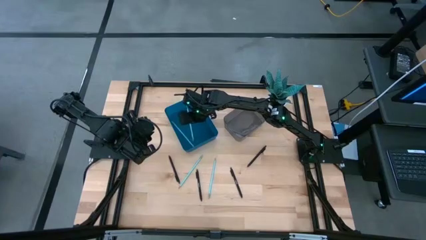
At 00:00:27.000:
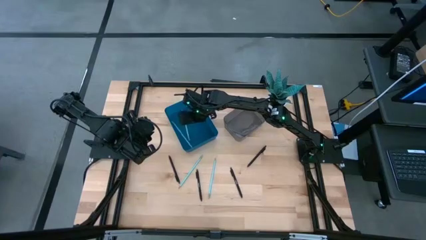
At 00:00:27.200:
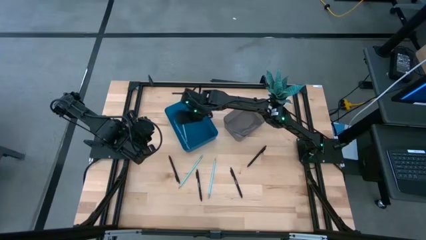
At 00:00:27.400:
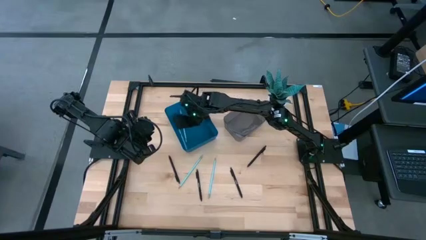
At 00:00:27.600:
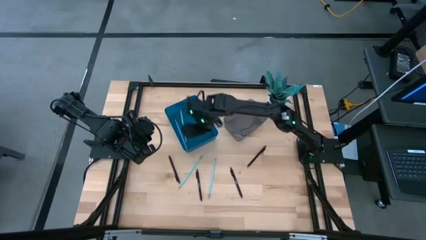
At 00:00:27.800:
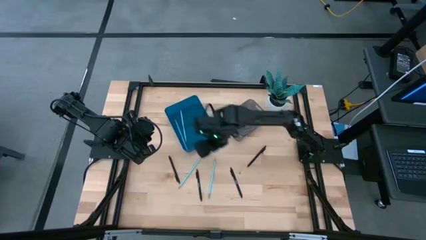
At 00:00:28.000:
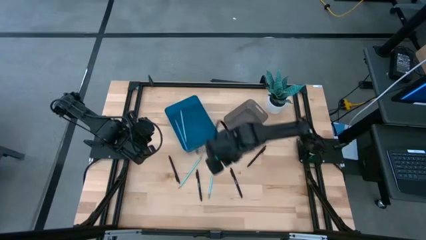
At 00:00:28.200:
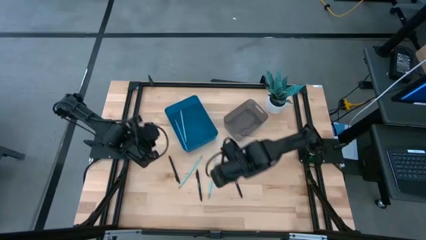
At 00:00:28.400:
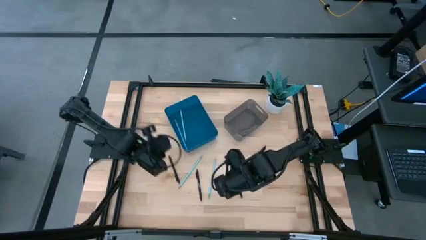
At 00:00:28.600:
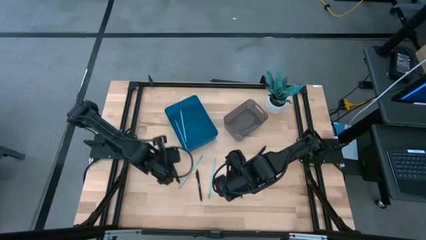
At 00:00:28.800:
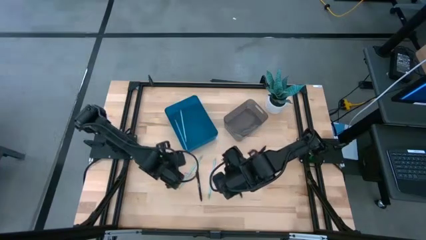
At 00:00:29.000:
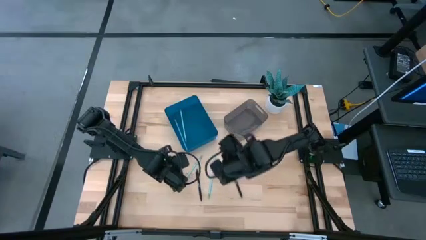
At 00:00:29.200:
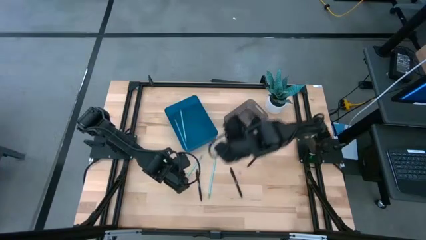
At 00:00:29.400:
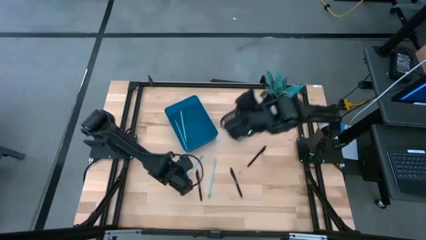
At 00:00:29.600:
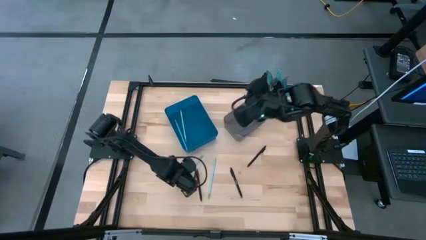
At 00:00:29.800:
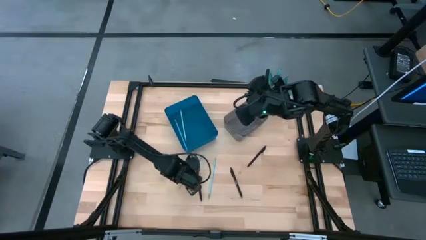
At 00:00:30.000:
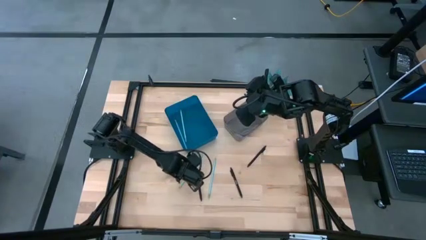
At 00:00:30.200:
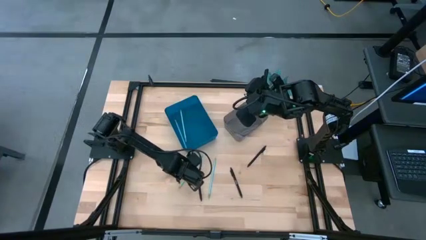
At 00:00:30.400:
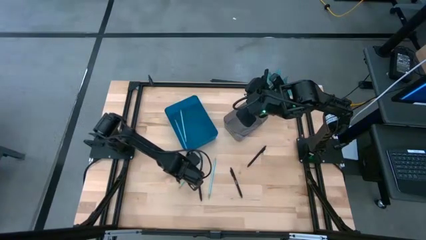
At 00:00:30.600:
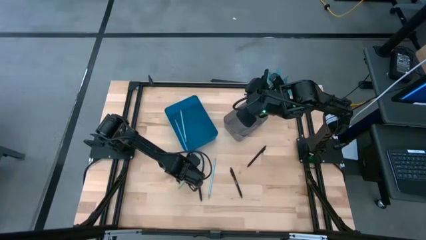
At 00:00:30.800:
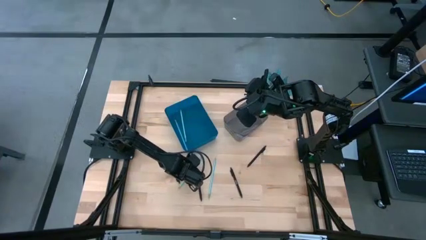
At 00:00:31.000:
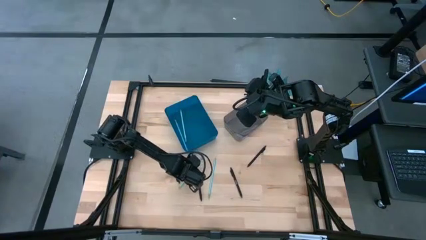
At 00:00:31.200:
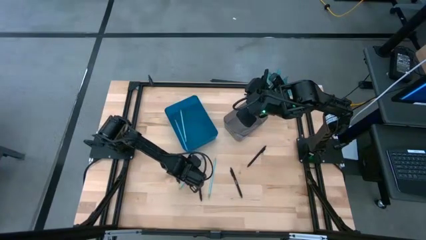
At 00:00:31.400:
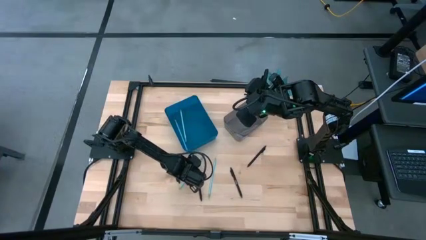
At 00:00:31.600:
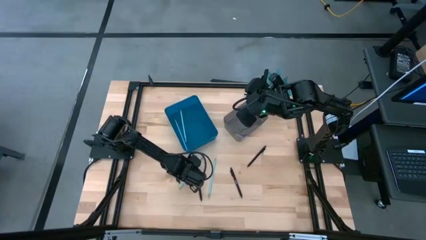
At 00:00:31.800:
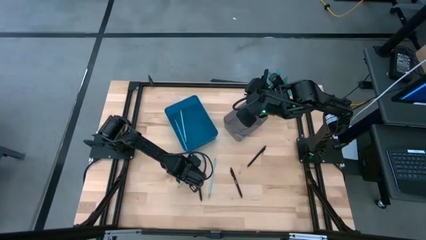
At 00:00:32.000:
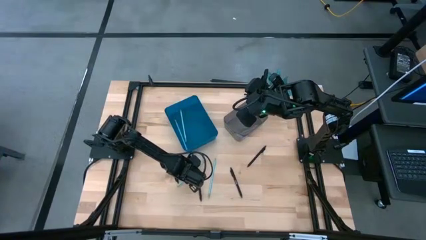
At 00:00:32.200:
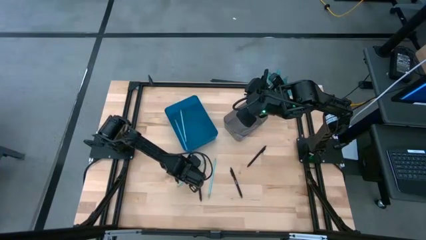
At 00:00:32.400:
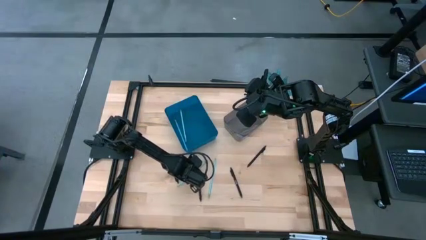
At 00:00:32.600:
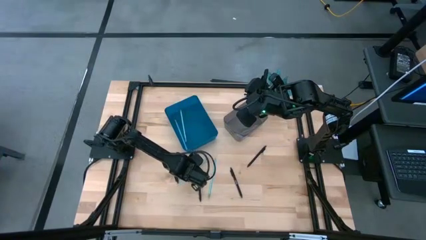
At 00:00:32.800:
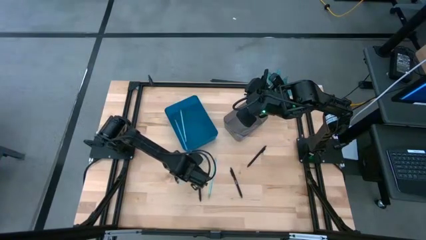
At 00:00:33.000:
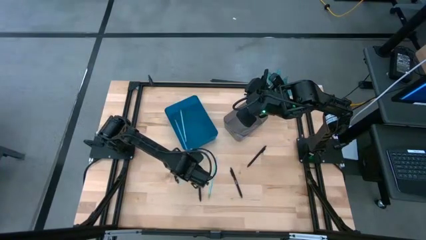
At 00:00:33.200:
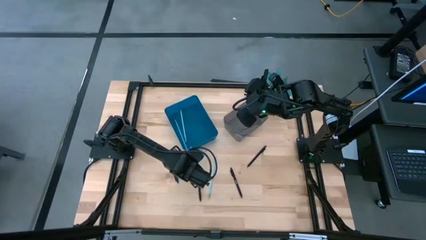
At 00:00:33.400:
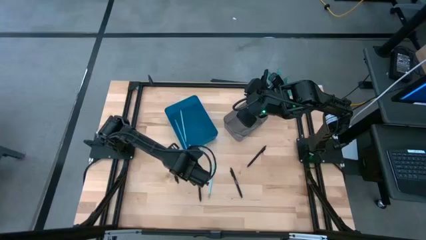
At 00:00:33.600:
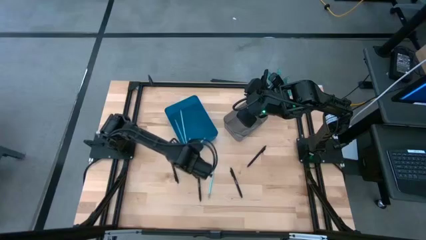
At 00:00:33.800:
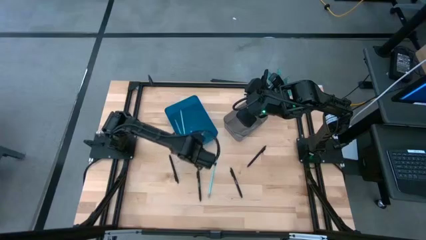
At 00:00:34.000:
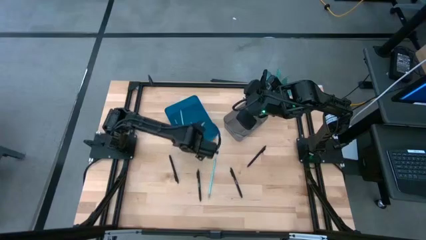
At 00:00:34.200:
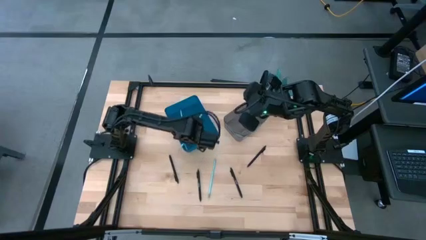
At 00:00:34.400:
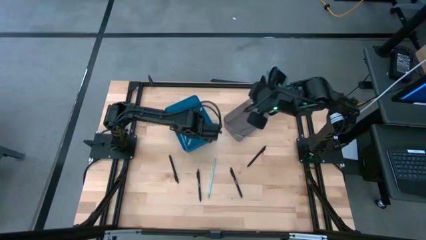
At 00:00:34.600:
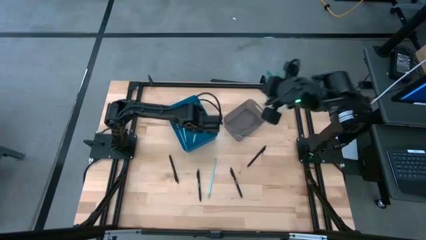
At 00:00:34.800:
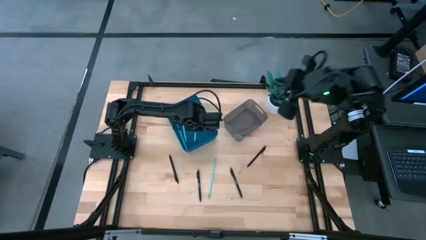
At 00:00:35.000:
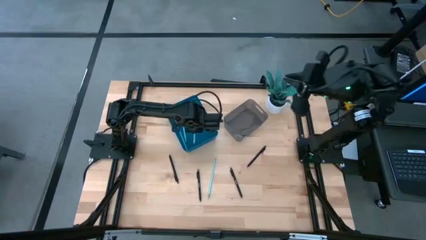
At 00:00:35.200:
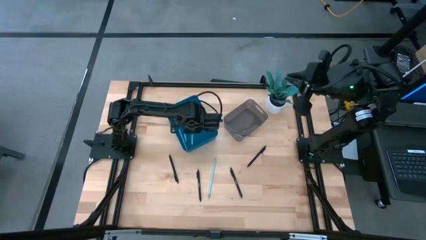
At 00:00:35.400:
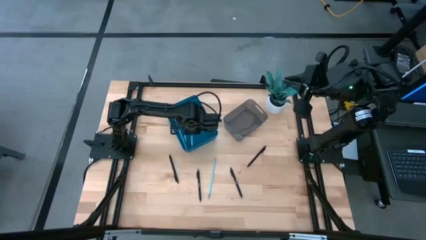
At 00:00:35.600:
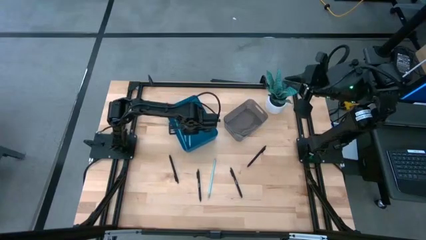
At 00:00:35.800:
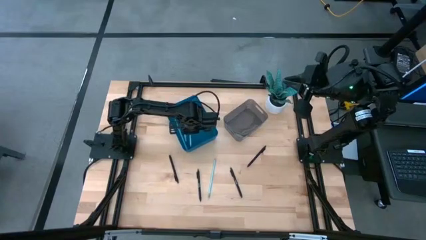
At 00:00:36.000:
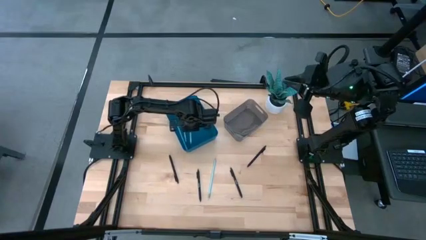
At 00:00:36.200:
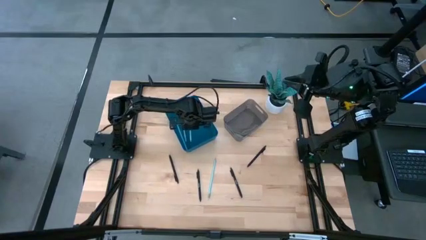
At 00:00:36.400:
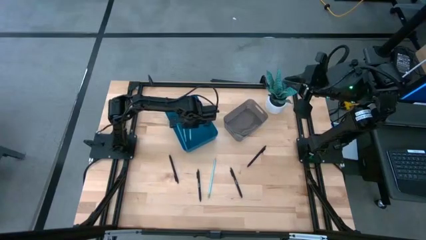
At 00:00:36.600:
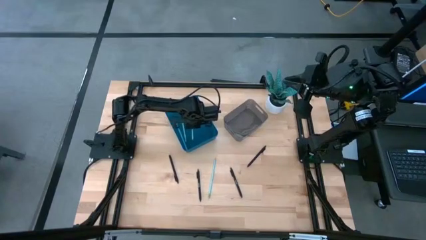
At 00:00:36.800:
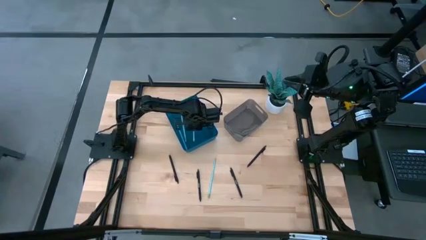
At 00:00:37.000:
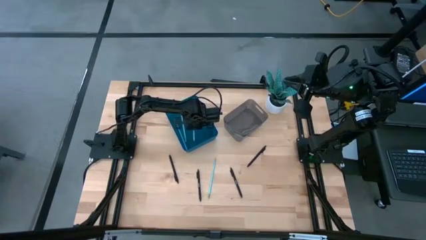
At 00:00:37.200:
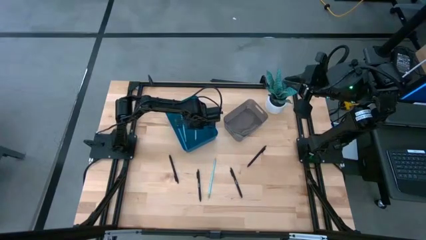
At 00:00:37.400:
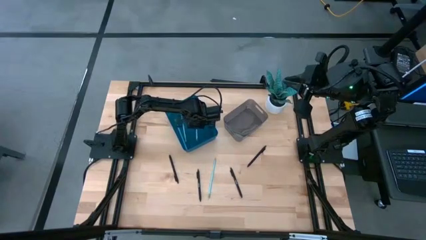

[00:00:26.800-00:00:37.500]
Task: Sort pens & pencils
Put the left light blue pencil into the blue bin

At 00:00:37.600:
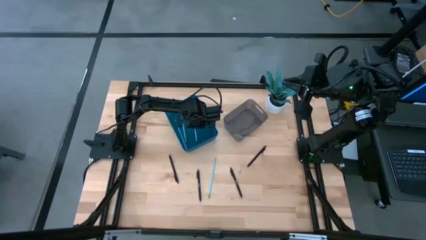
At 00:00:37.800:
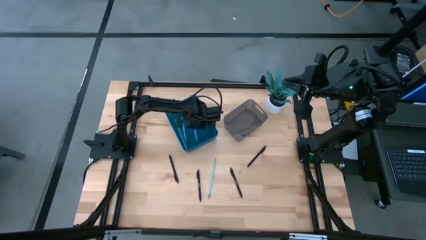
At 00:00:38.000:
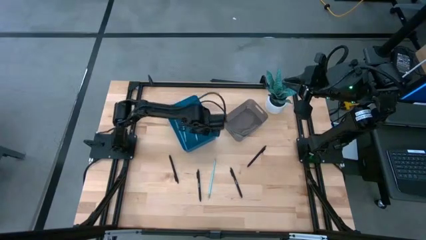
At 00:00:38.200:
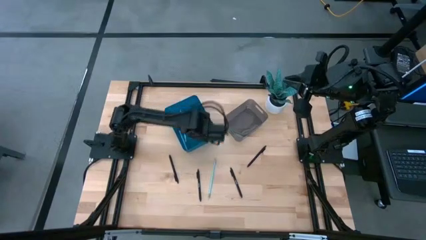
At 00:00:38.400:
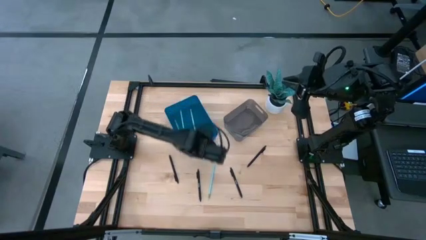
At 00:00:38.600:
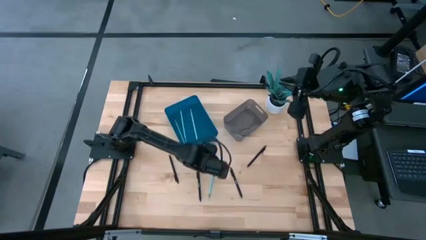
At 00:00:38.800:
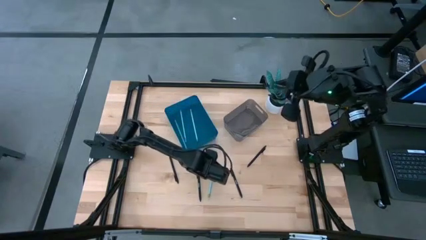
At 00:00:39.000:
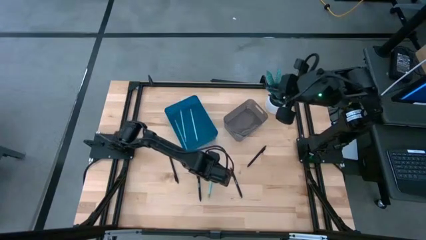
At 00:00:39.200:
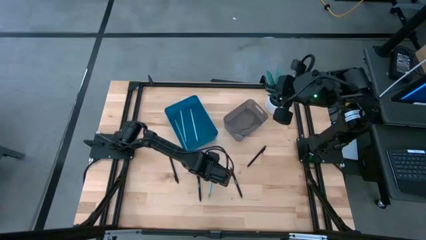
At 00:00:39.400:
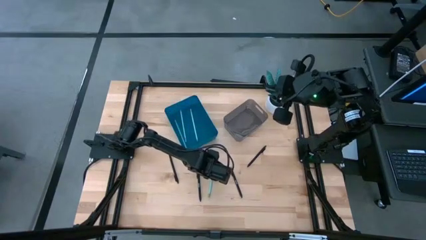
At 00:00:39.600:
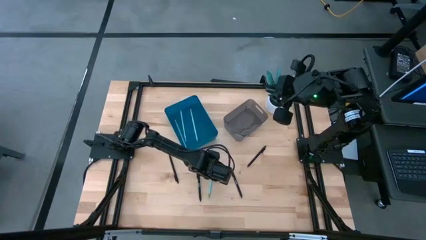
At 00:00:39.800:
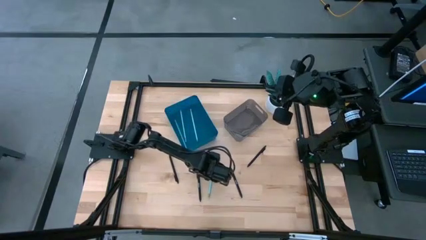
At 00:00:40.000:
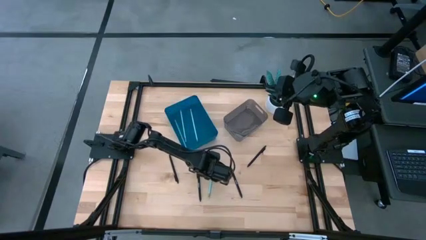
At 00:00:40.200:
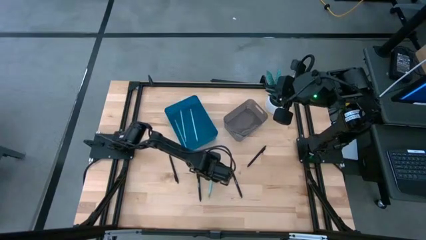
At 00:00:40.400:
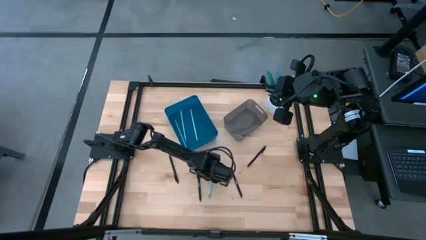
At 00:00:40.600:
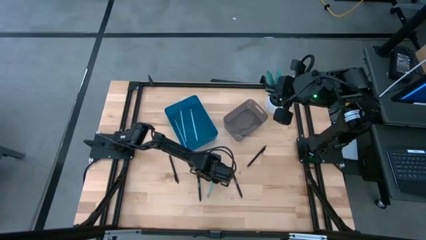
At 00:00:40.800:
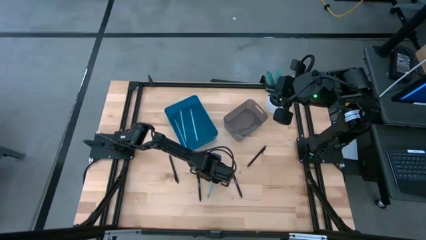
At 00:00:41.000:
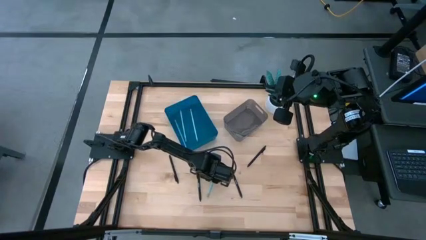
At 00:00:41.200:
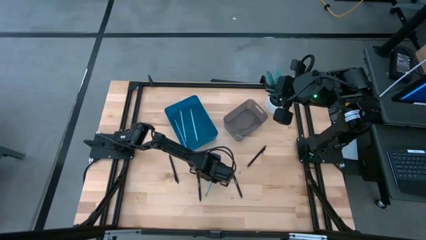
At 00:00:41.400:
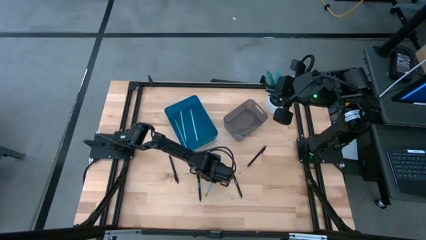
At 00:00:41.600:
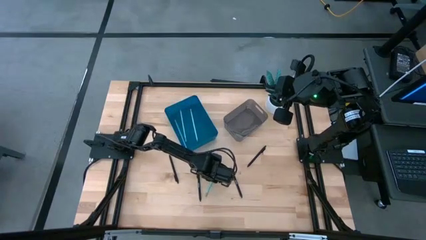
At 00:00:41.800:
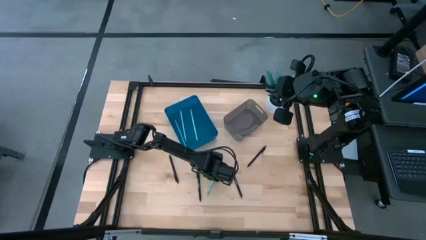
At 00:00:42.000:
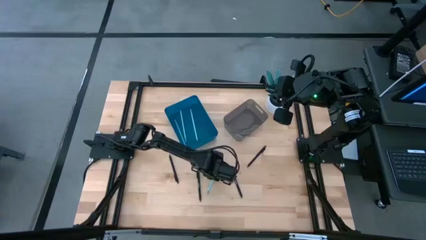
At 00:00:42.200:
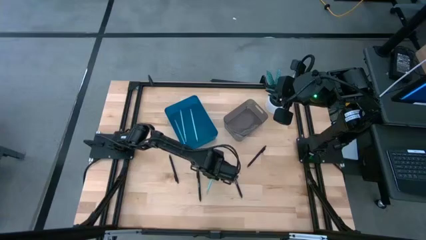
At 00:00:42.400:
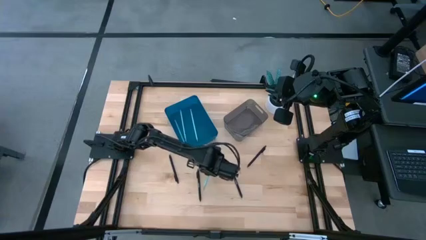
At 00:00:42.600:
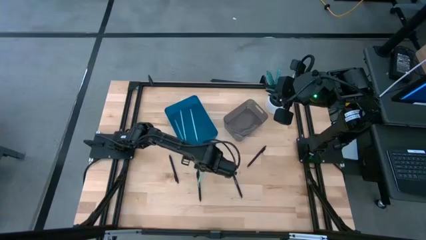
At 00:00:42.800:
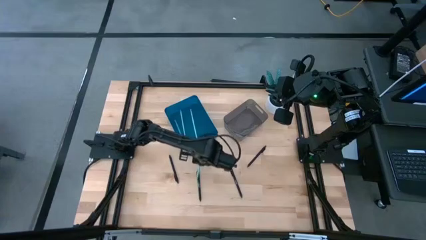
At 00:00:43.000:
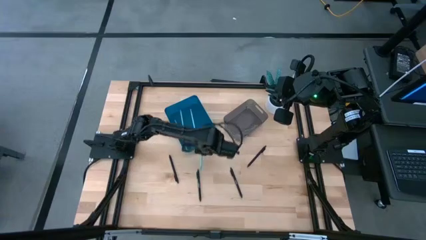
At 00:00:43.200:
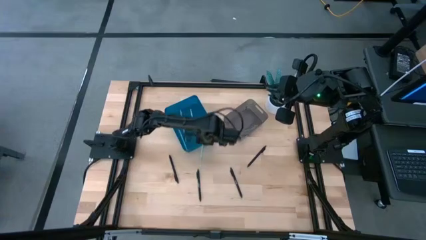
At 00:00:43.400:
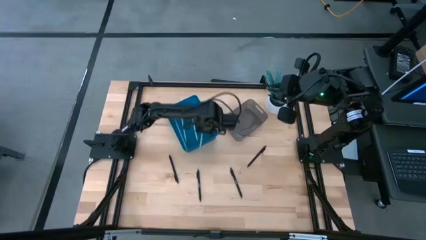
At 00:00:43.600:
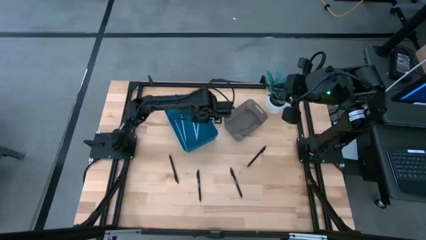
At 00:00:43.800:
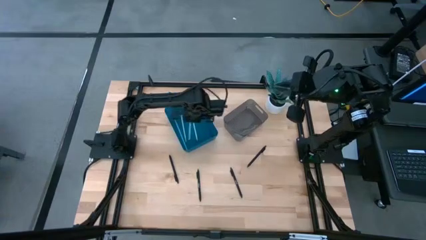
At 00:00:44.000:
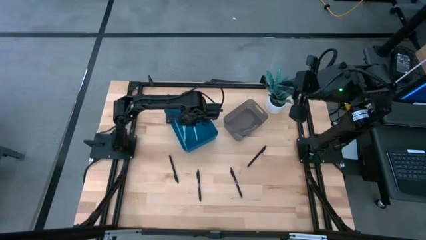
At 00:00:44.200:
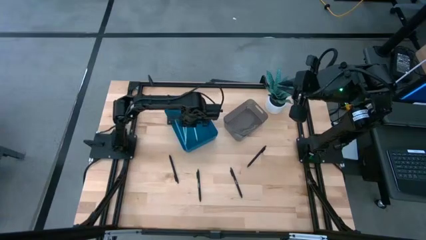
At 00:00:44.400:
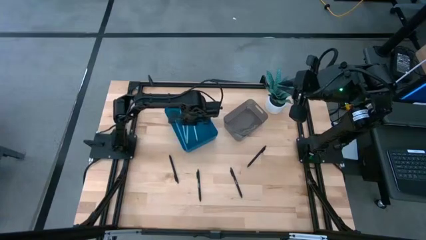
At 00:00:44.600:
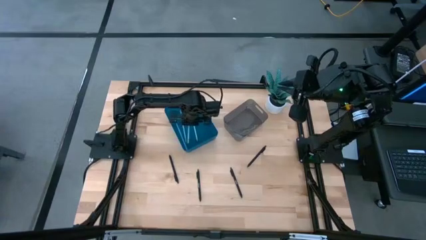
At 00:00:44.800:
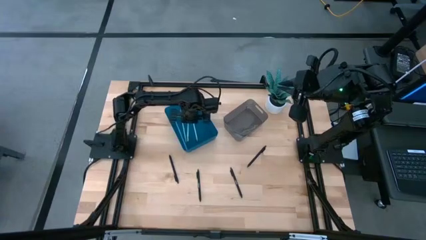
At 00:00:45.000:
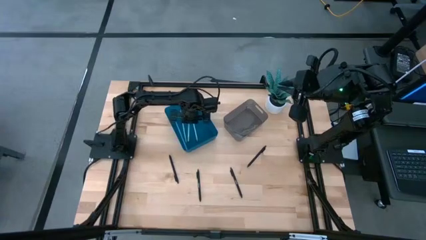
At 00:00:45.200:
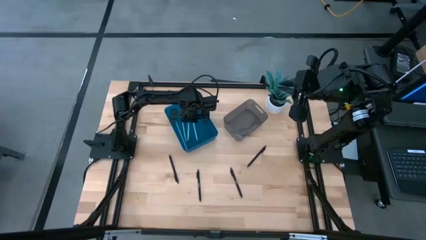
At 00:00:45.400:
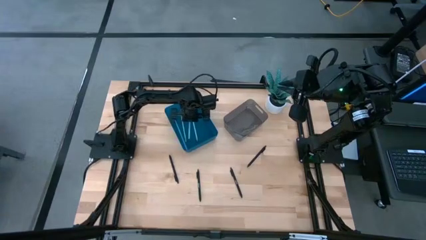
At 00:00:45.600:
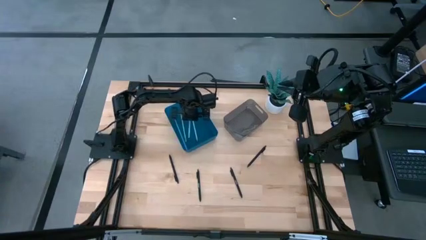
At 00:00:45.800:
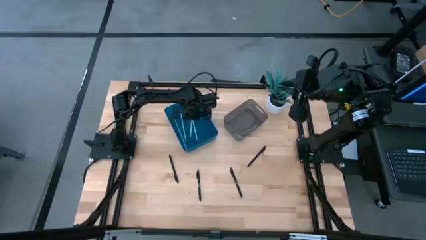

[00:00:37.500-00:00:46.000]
Put the light blue pencil into the blue bin
